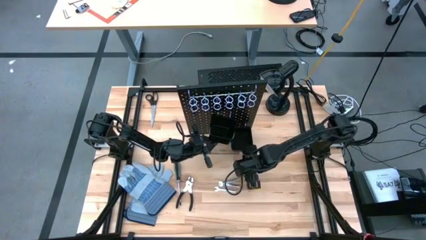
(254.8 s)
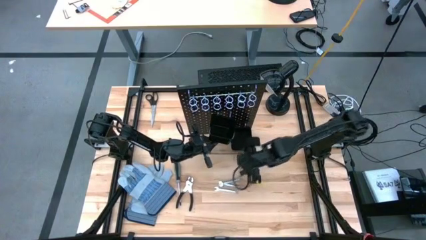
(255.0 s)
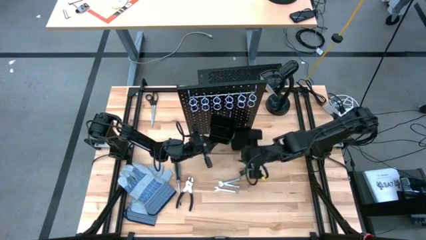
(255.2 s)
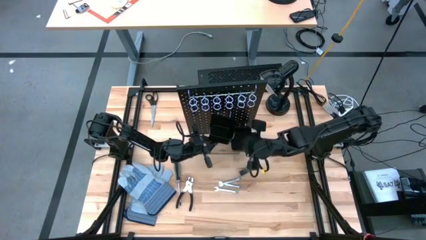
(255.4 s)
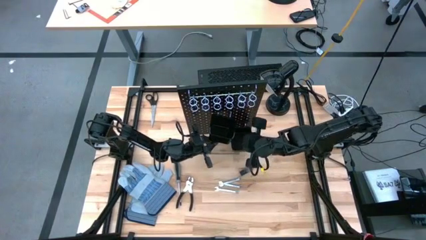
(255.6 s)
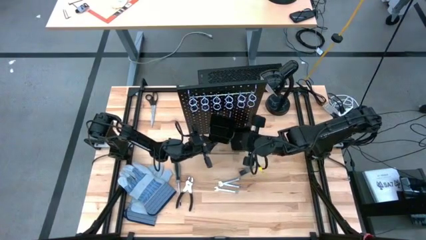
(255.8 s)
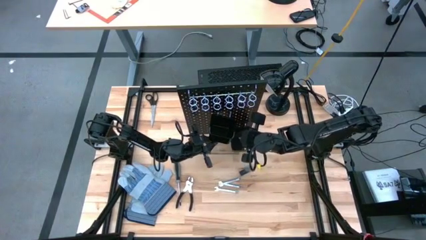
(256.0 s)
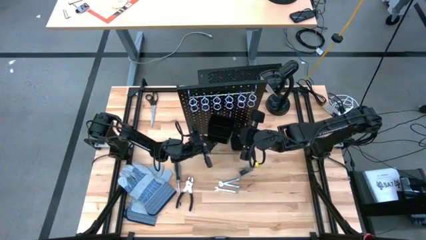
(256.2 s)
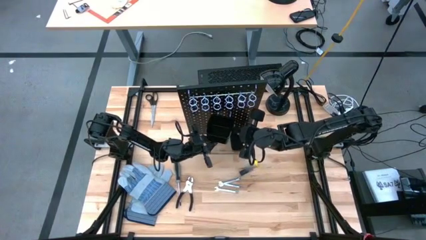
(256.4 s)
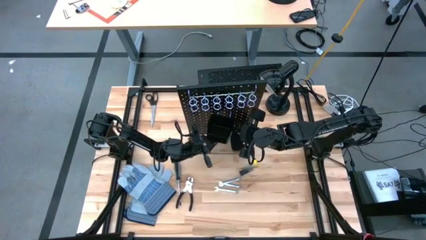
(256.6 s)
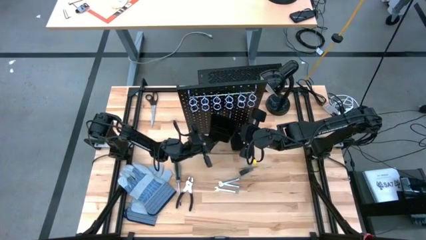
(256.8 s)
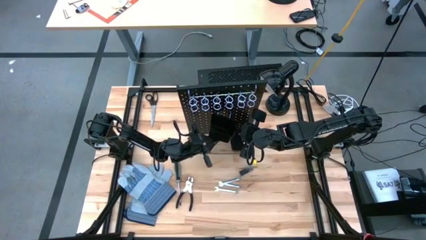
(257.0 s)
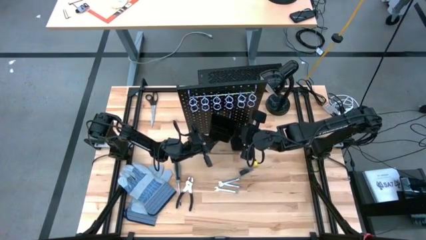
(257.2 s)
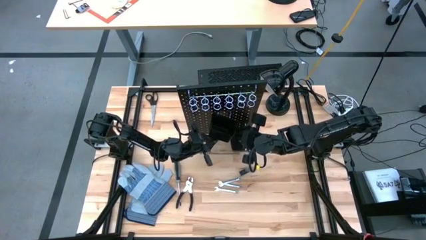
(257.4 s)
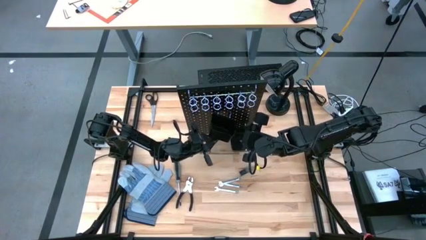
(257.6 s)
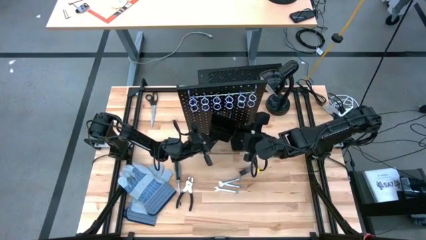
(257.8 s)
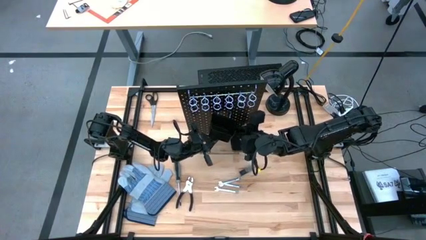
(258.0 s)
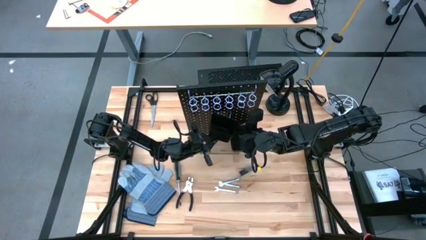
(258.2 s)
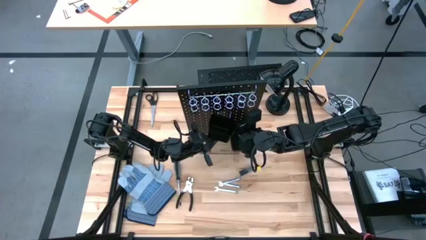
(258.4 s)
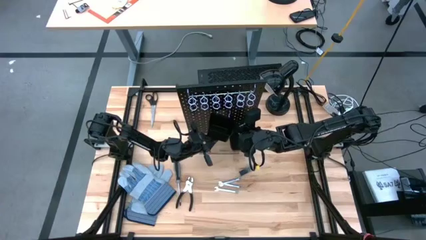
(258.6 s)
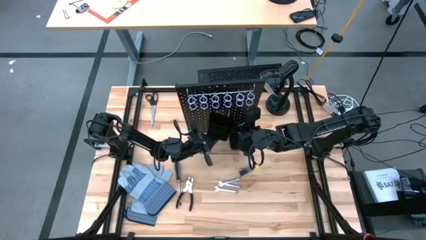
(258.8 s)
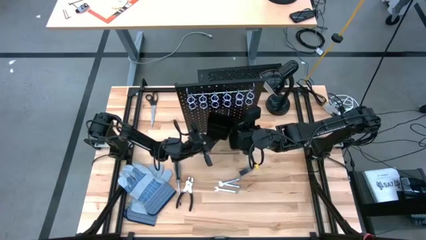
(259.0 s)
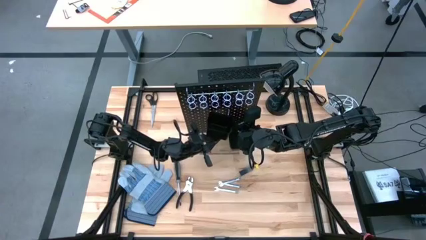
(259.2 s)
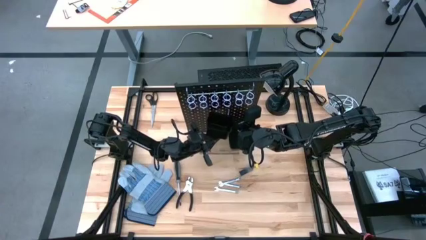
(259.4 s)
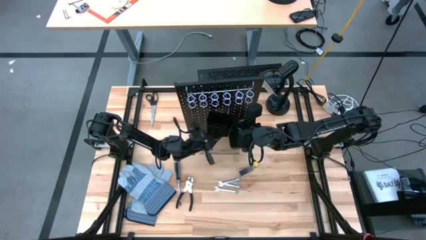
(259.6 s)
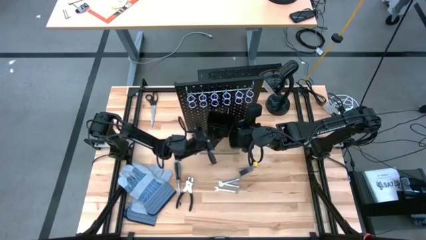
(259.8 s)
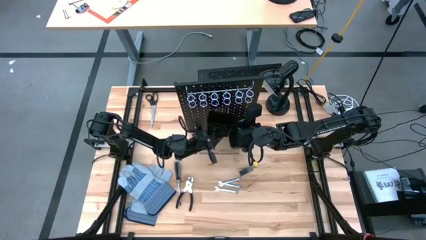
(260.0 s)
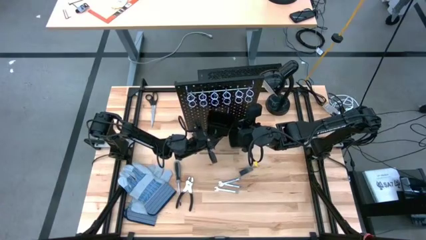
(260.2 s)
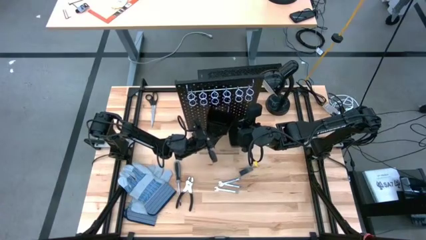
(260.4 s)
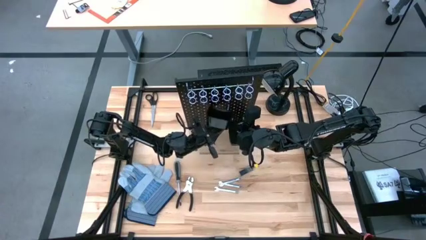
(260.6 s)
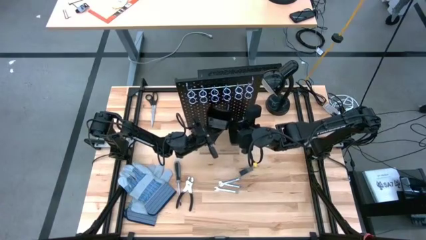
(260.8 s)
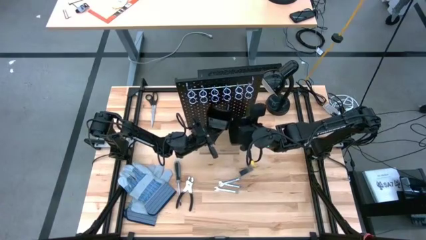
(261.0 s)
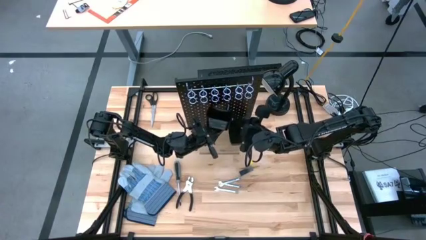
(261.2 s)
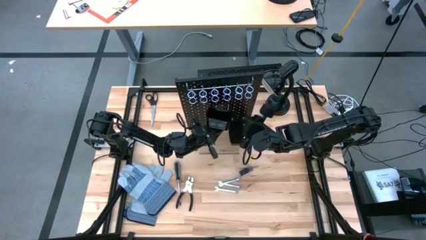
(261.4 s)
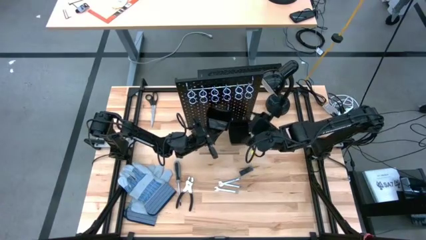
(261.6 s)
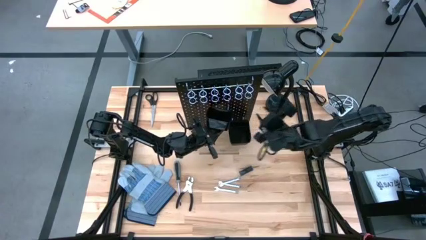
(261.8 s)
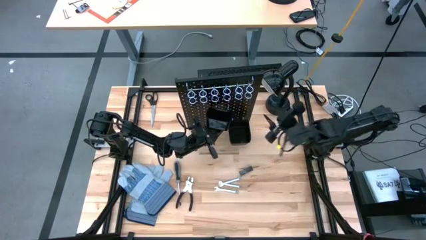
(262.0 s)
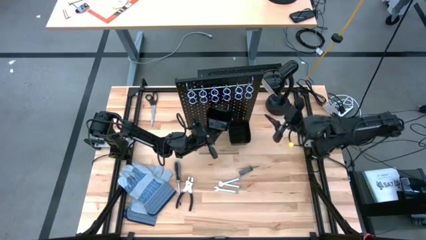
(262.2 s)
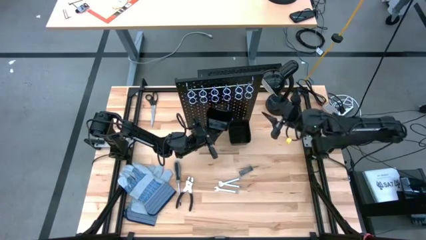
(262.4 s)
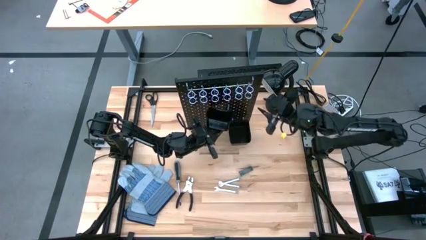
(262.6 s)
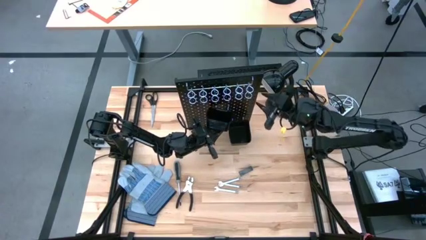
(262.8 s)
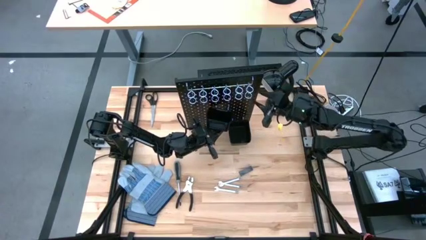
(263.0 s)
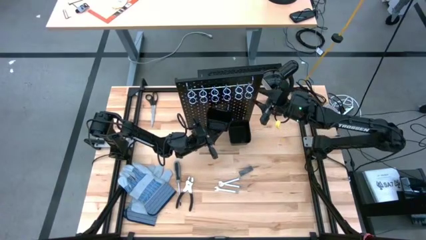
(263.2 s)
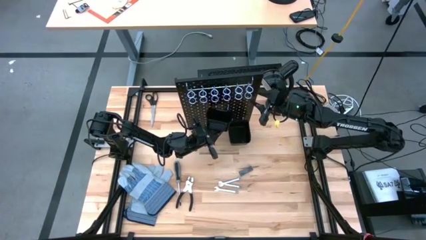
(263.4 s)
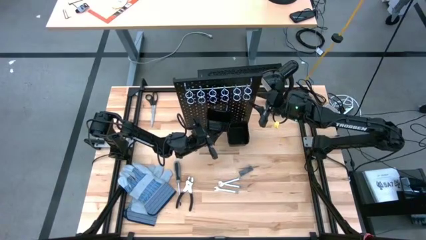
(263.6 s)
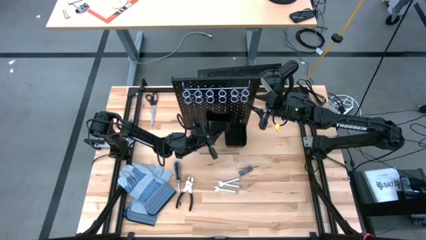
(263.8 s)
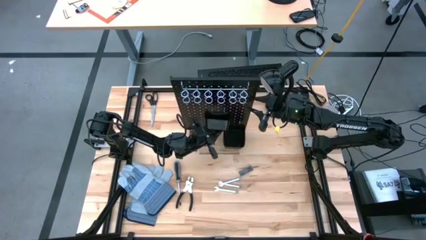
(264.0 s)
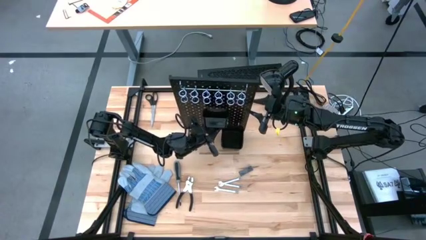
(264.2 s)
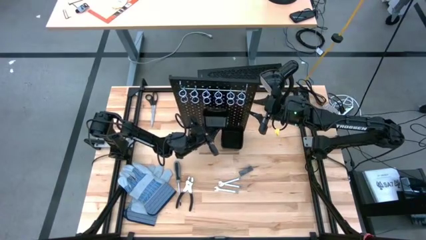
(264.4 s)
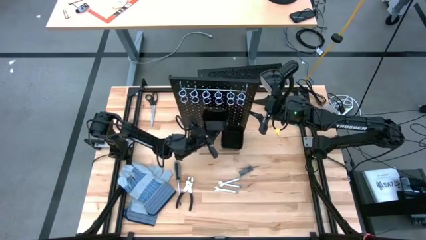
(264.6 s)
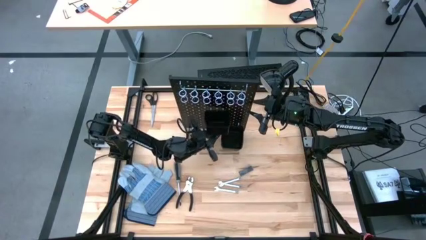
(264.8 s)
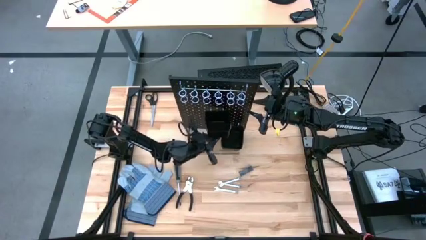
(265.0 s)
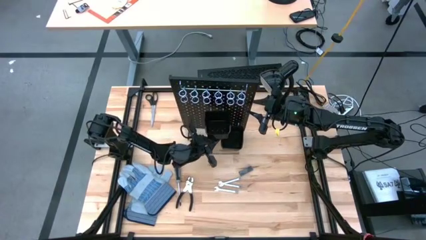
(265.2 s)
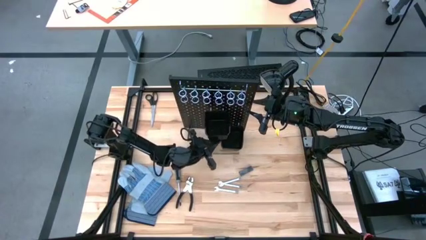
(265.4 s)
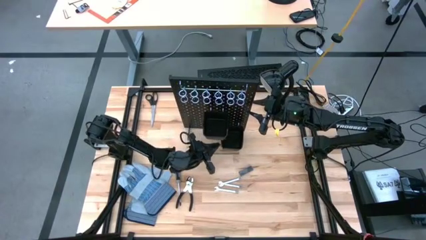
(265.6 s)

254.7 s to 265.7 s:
Task: Hang tools onto peg board
Adjust the black pegboard on the table

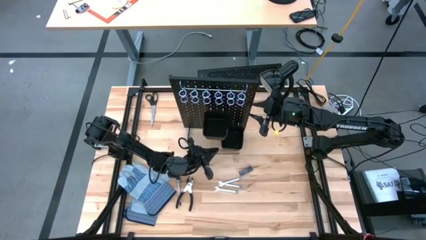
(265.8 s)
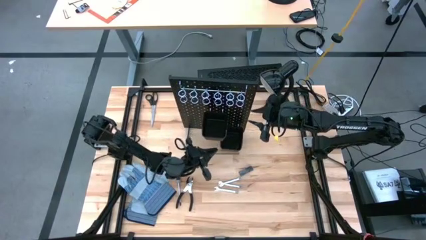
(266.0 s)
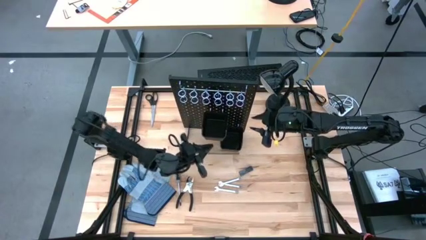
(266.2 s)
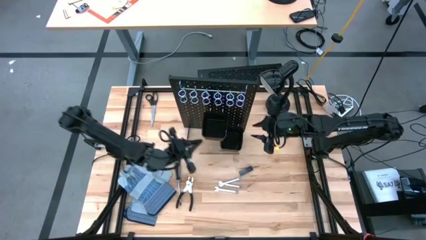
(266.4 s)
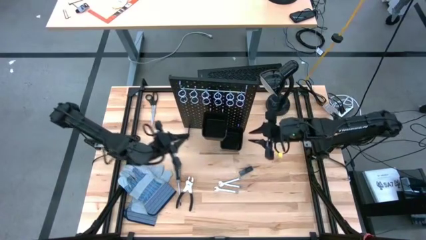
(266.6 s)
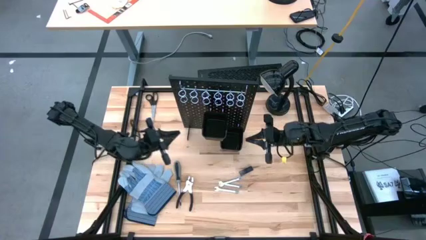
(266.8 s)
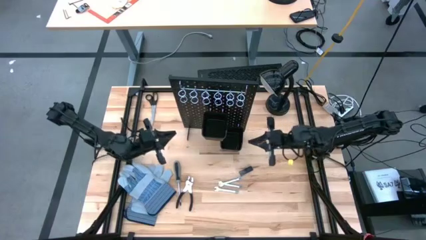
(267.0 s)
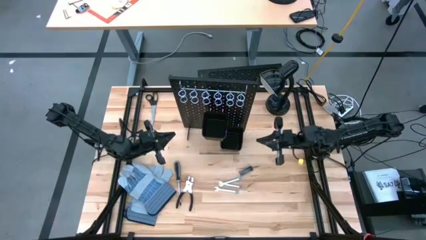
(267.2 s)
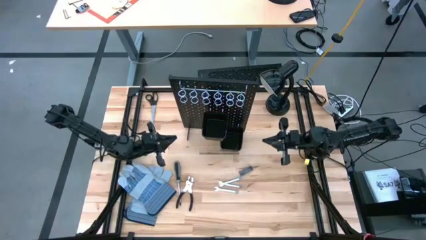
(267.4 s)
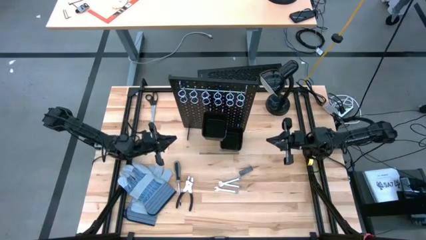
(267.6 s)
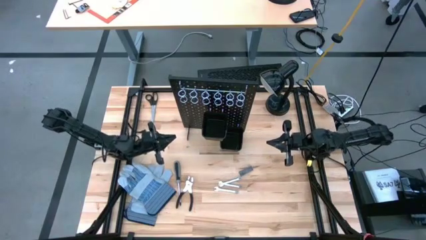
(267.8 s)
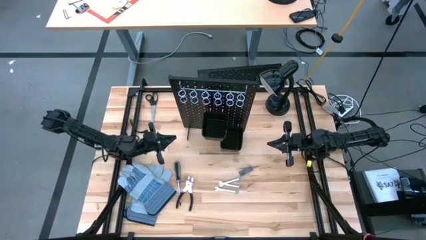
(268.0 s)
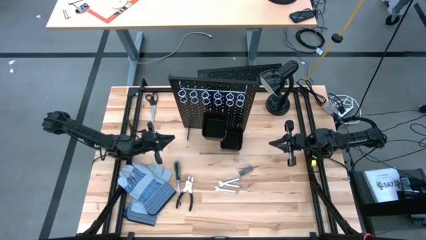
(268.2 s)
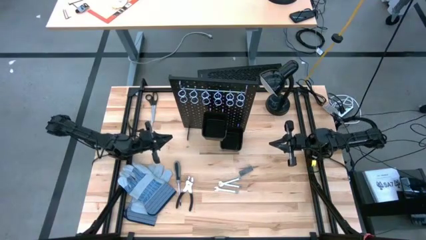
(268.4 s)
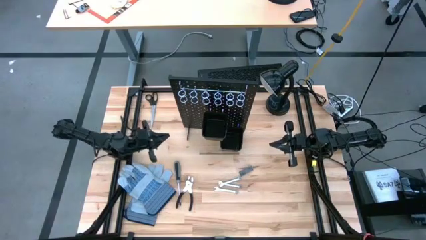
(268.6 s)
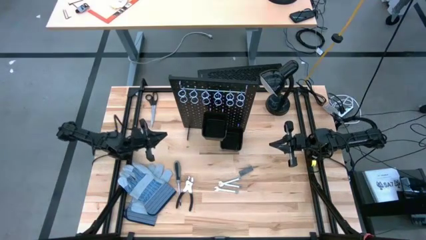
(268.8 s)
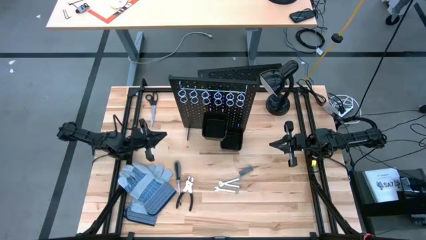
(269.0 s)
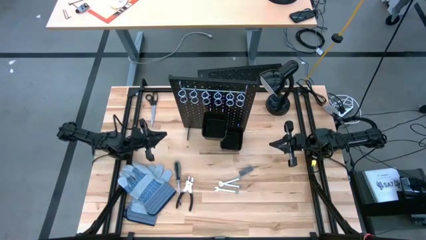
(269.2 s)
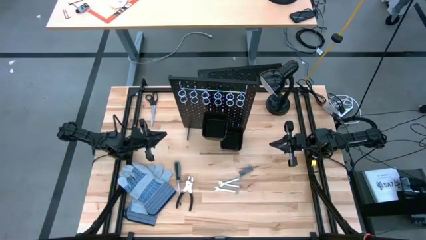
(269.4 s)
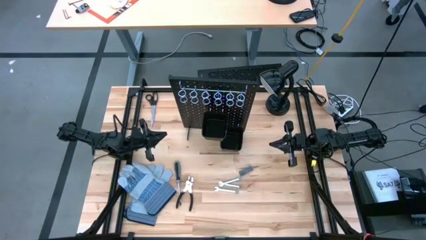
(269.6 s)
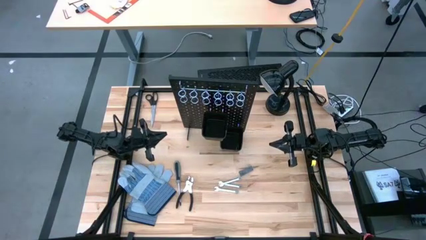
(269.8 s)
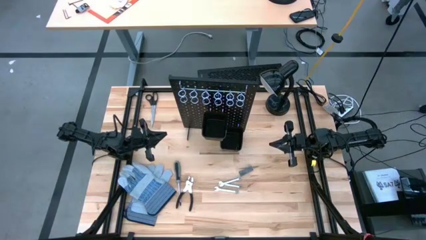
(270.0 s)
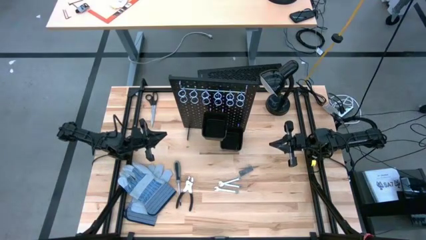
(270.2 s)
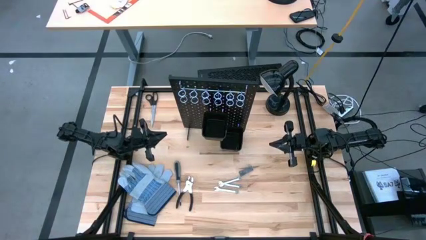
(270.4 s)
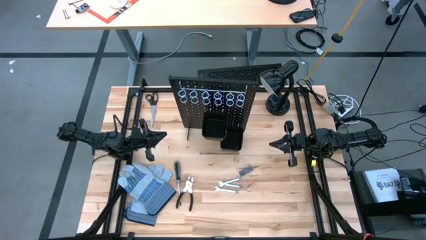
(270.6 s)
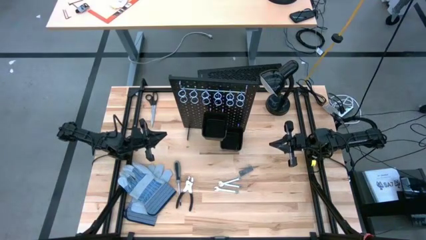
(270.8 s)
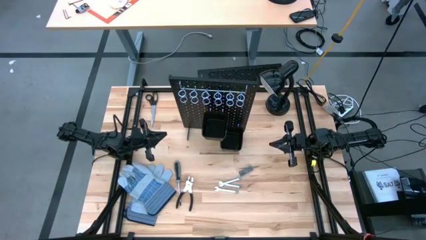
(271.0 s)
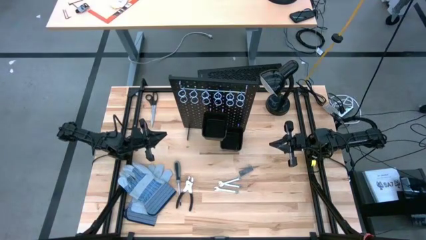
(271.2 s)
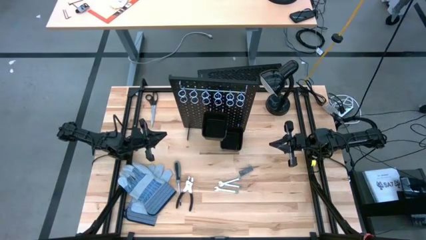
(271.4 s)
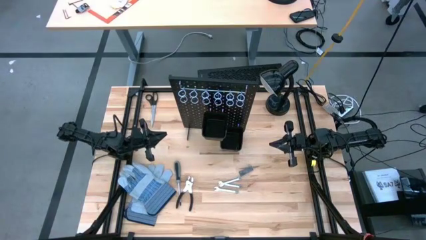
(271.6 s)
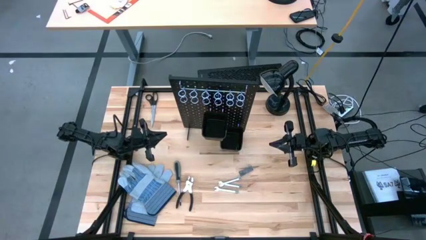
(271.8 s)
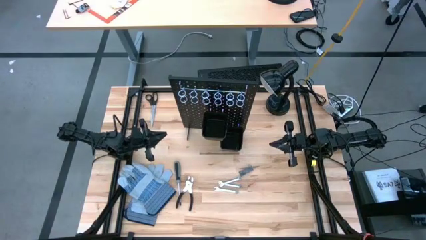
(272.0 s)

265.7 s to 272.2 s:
Return to Home Position
